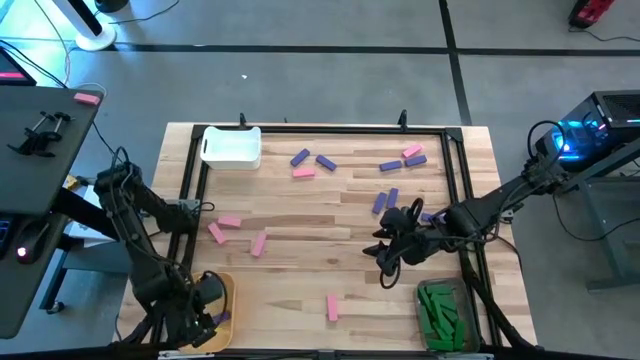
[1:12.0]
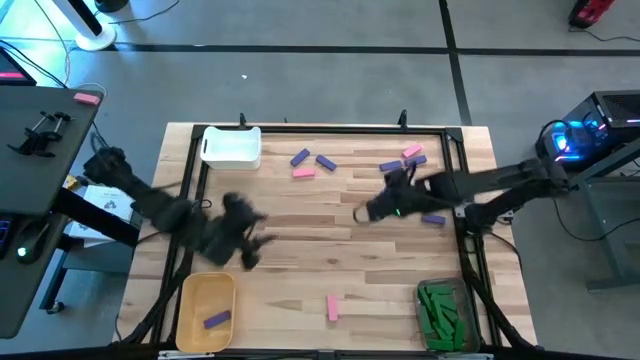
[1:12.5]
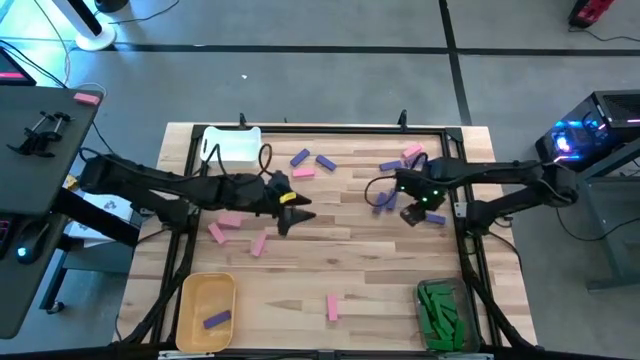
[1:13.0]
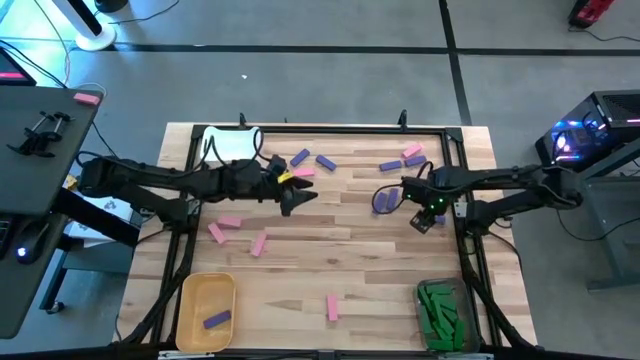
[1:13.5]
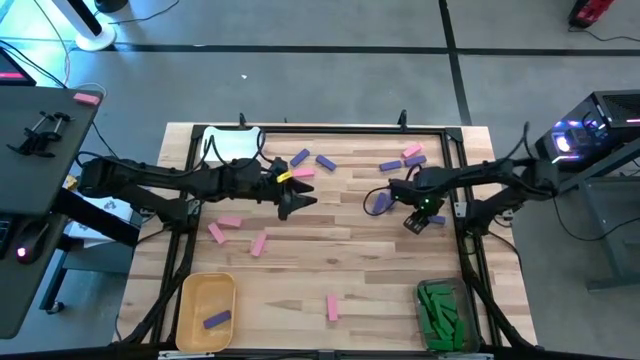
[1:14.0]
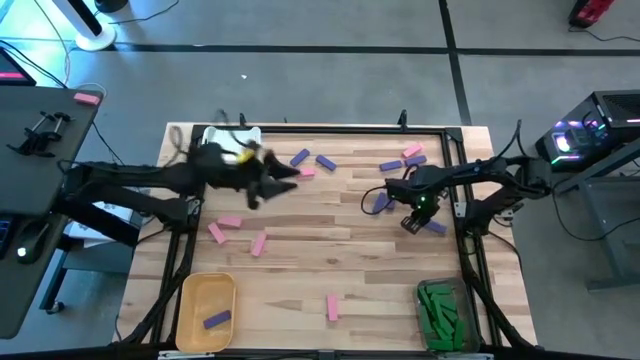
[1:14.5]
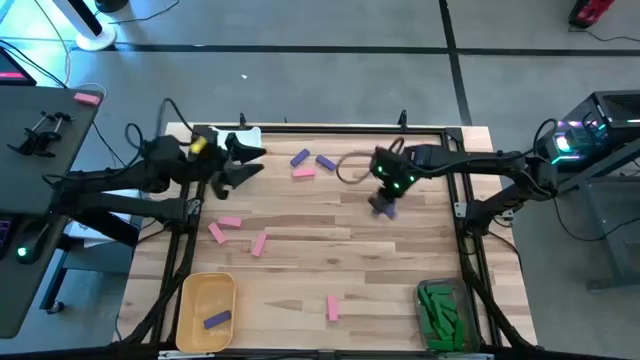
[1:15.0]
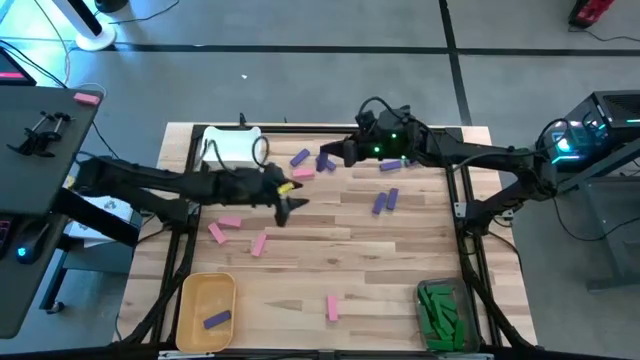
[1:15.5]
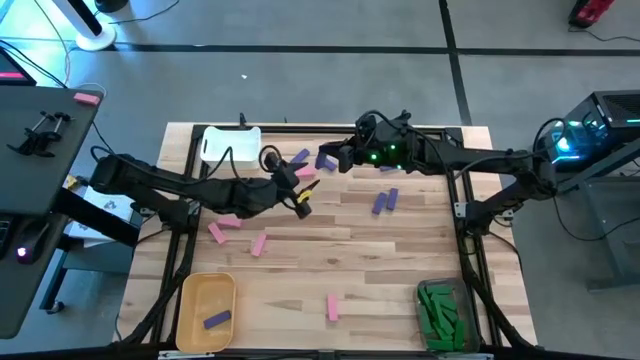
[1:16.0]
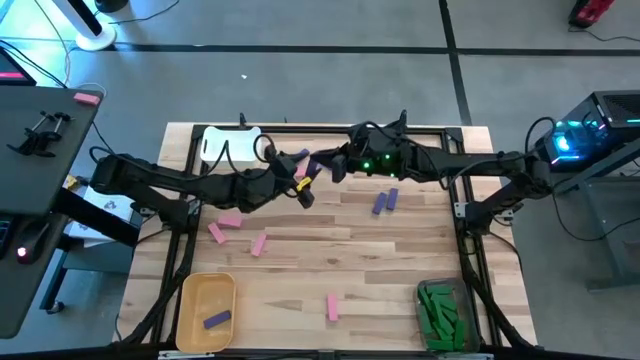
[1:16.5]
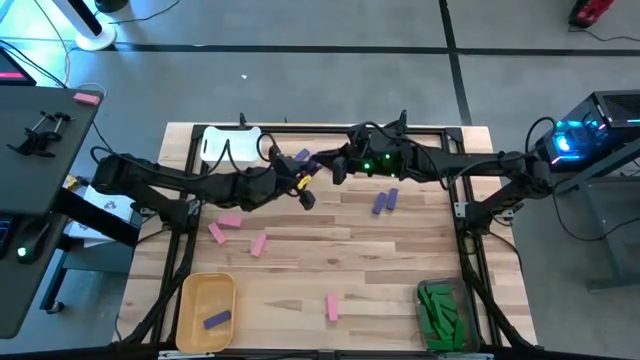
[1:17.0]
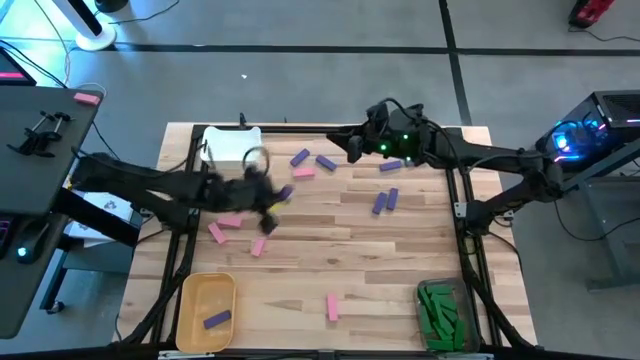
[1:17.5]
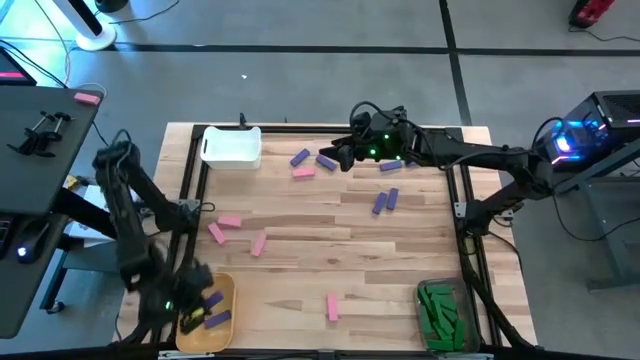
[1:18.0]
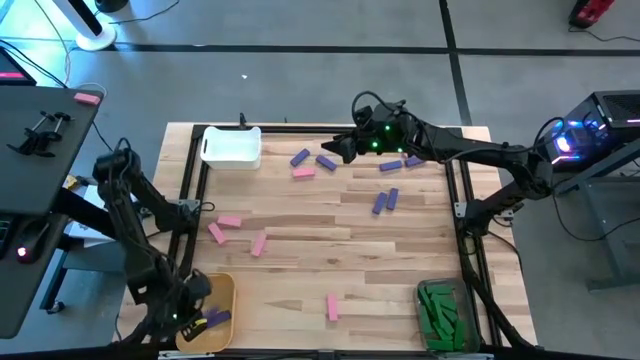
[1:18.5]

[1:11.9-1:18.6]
Task: Sort blocks
Put the blue wooden block into the yellow bin

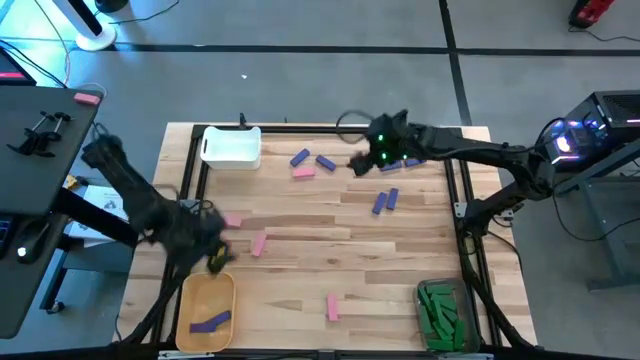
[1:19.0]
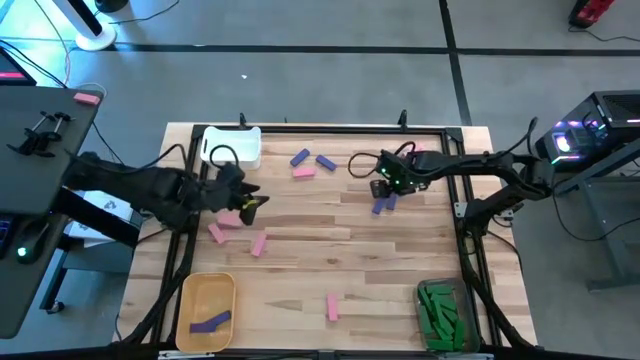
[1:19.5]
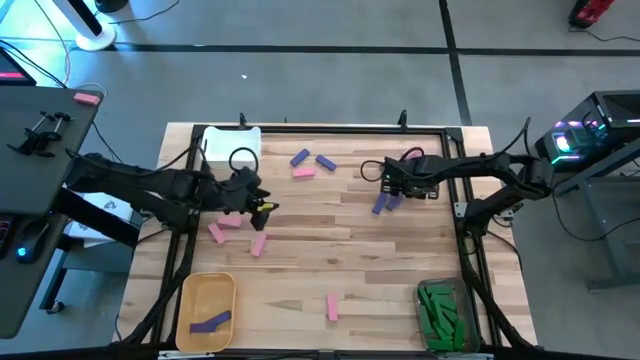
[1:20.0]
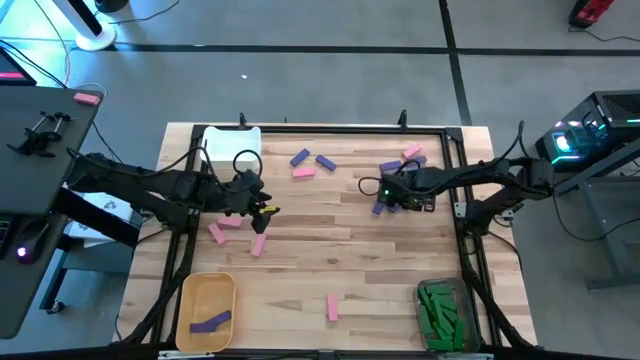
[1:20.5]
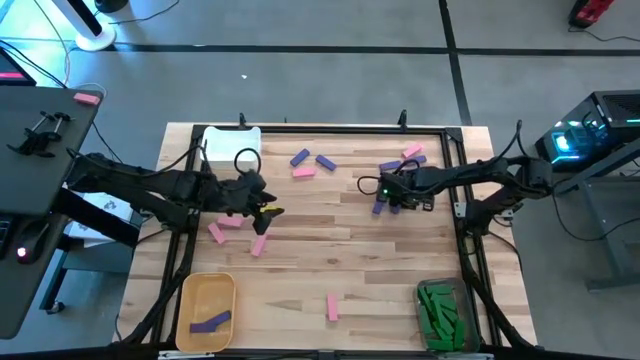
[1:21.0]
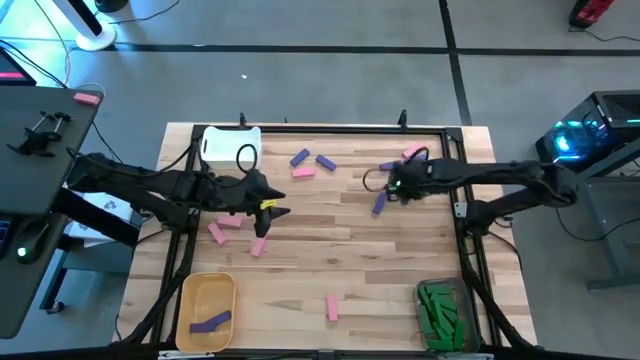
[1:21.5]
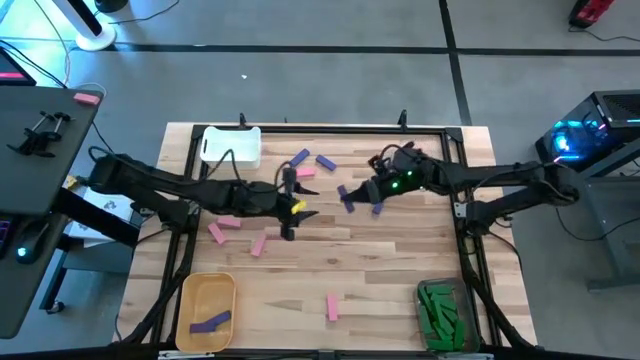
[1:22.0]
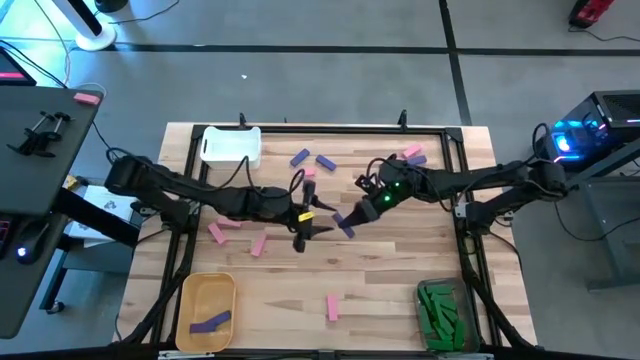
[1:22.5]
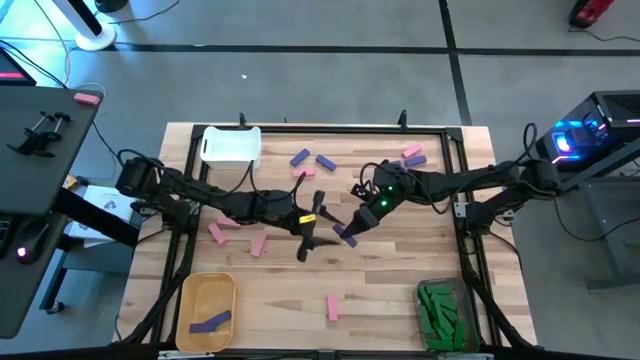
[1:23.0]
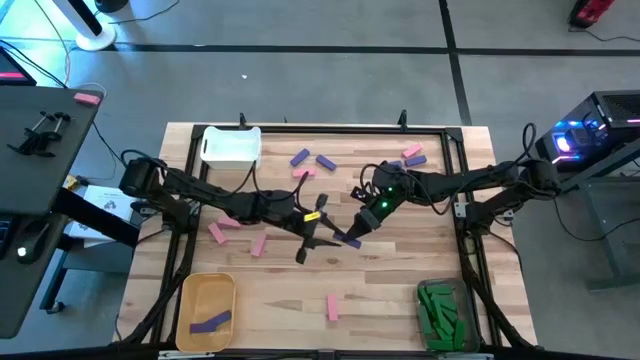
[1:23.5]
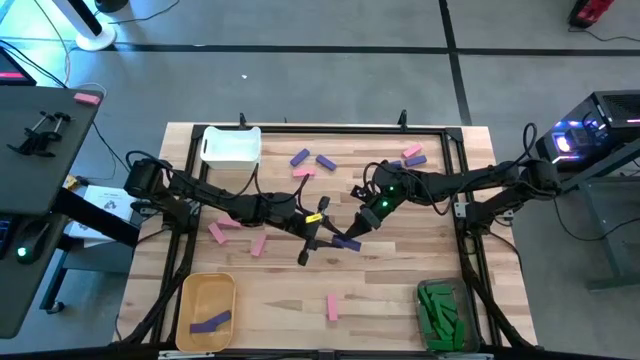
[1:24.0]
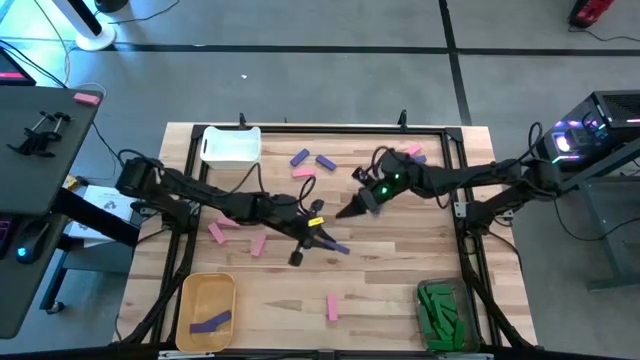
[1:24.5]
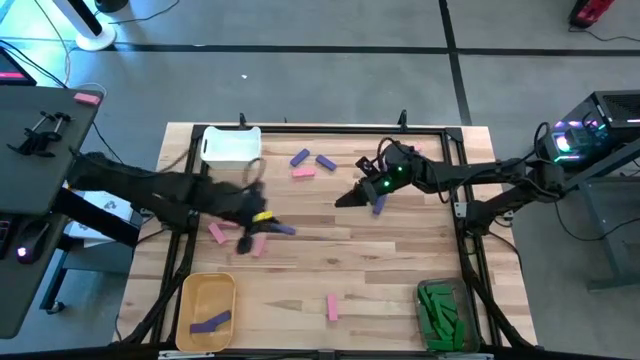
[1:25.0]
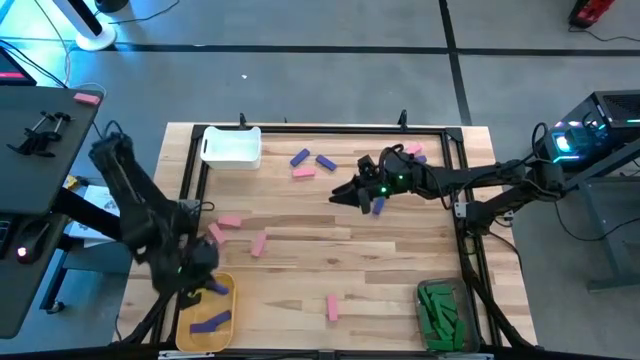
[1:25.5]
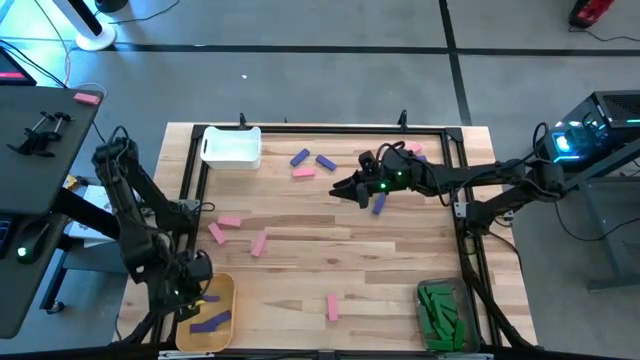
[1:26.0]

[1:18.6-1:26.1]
Put the blue wooden block into the yellow bin

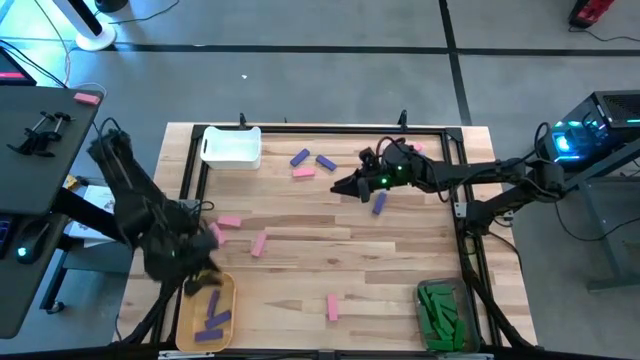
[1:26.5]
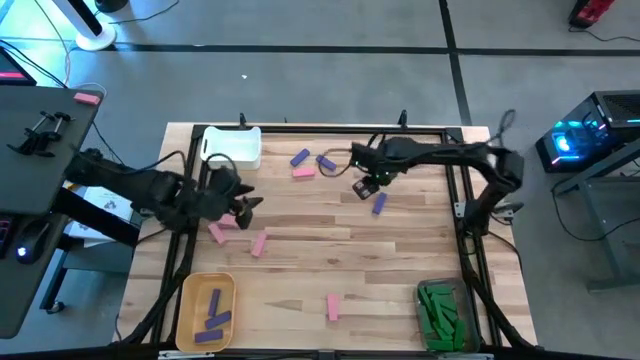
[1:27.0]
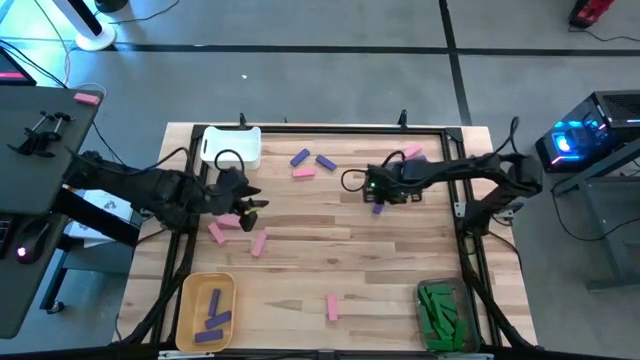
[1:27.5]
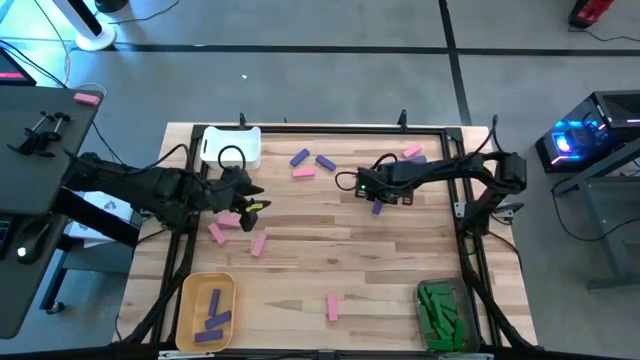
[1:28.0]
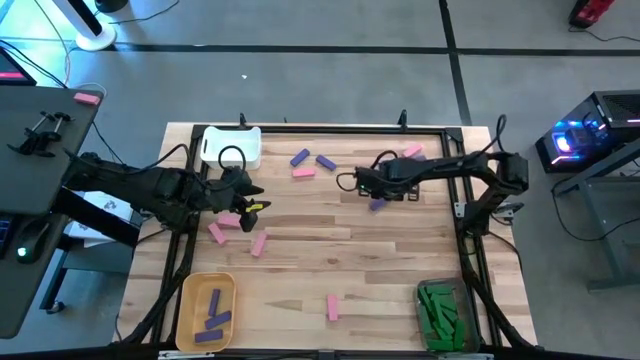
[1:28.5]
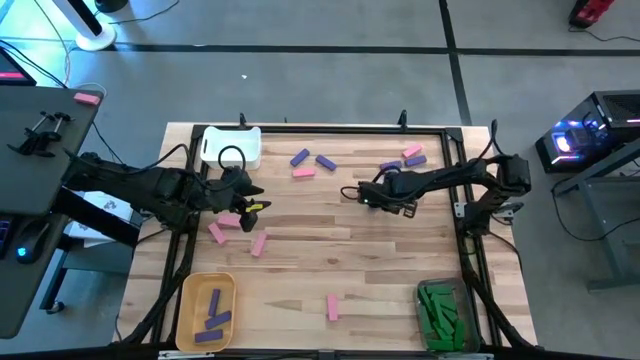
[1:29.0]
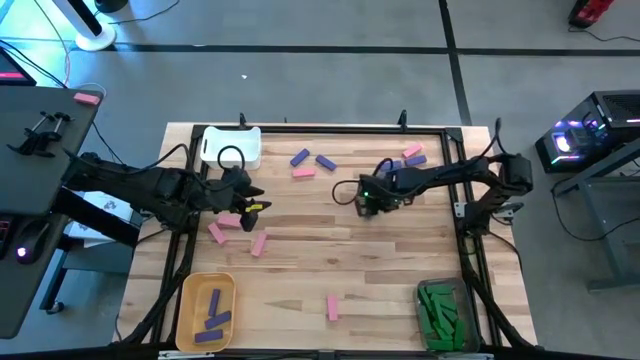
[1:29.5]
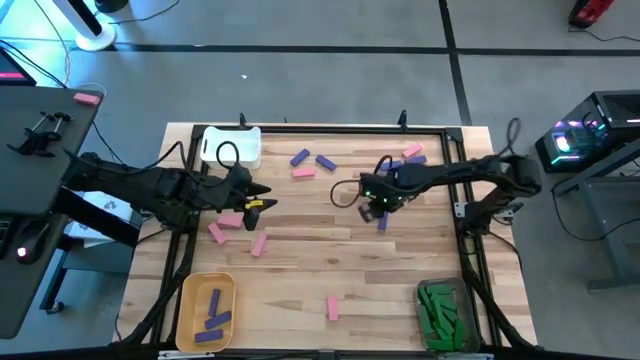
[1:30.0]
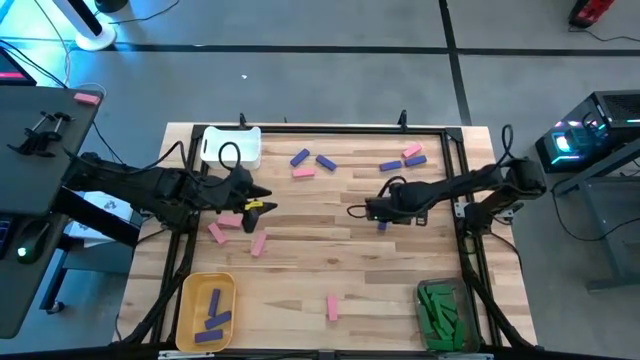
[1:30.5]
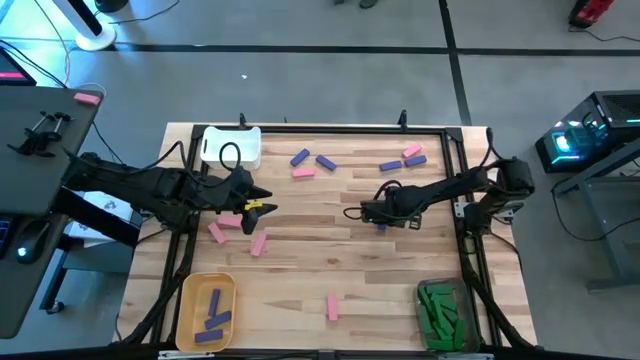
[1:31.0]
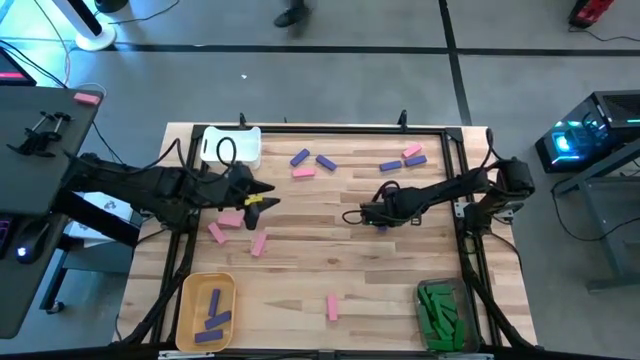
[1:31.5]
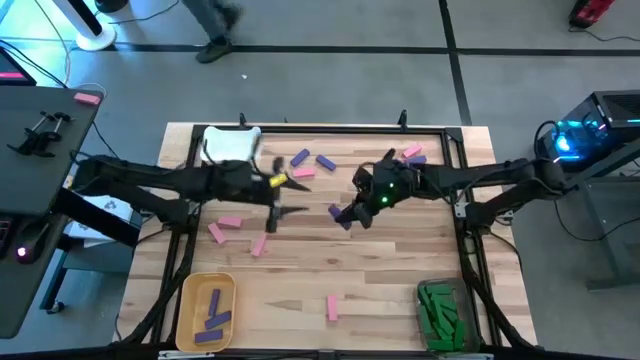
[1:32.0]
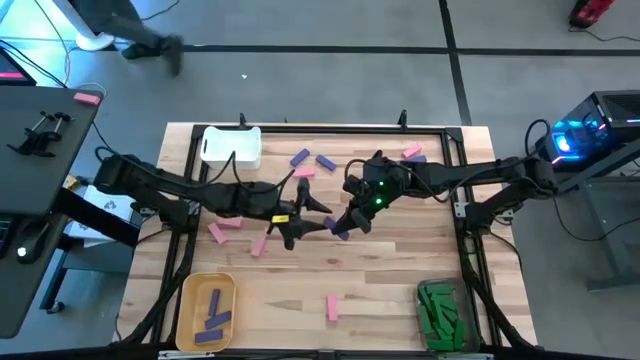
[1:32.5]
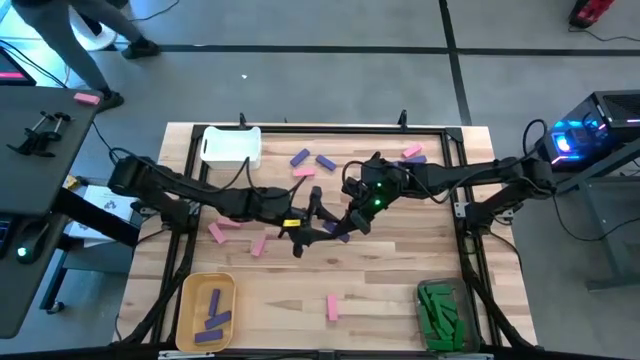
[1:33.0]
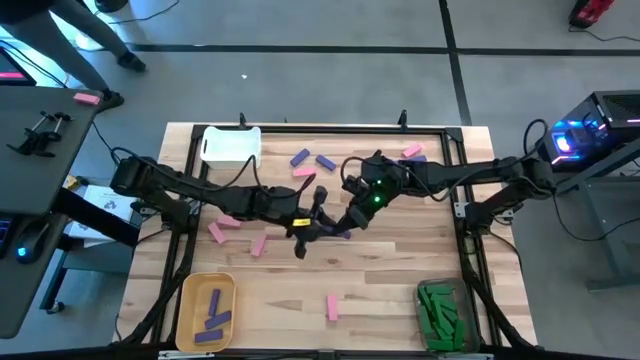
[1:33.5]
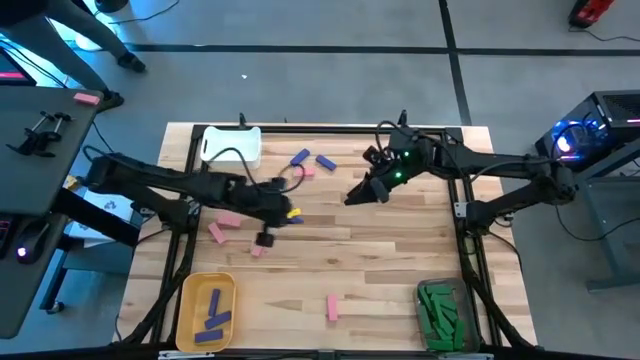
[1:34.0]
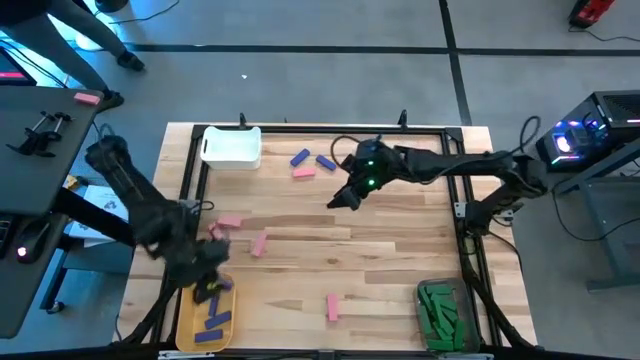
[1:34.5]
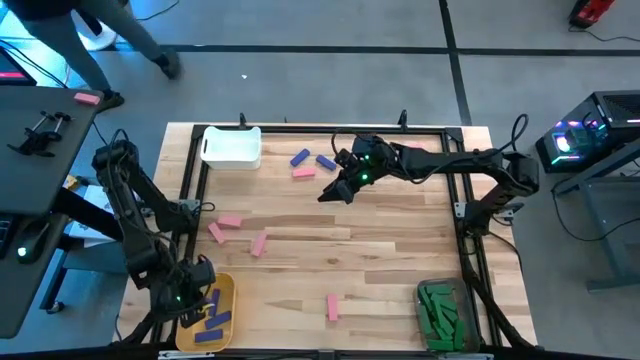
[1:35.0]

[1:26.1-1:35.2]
Put the blue wooden block into the yellow bin
